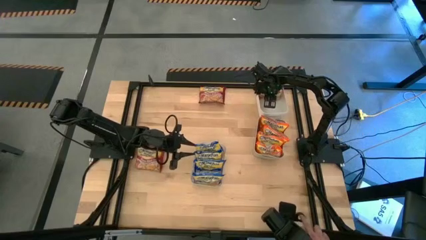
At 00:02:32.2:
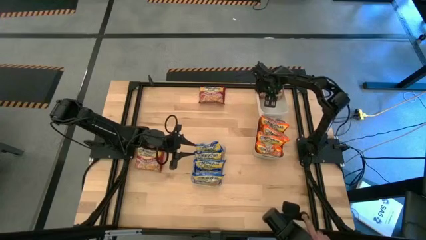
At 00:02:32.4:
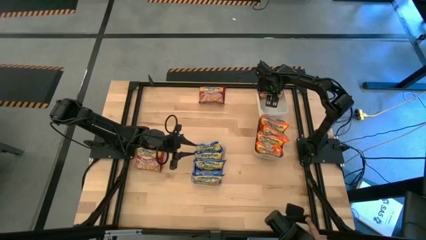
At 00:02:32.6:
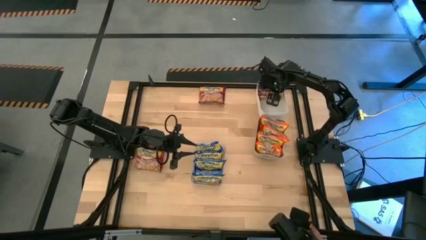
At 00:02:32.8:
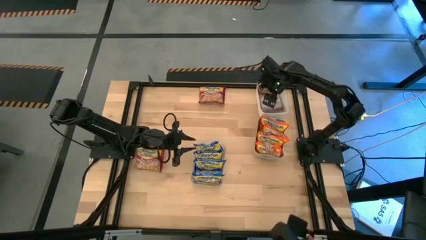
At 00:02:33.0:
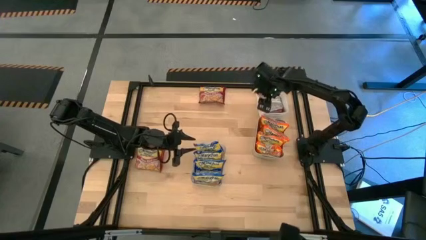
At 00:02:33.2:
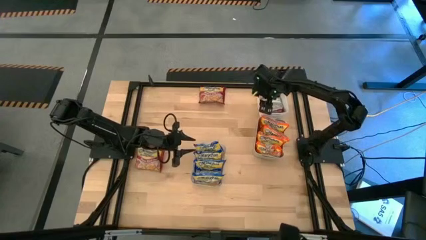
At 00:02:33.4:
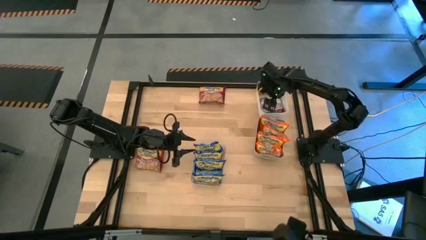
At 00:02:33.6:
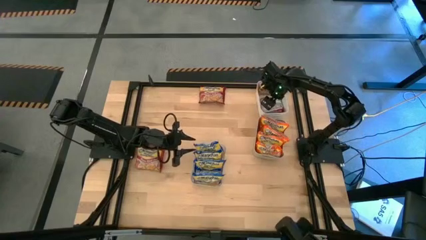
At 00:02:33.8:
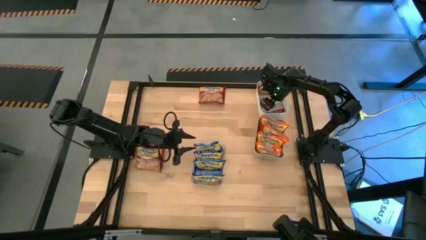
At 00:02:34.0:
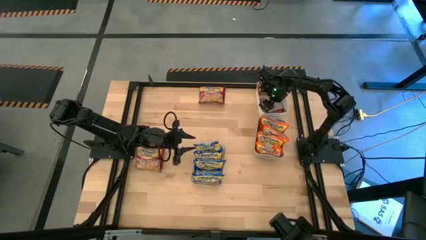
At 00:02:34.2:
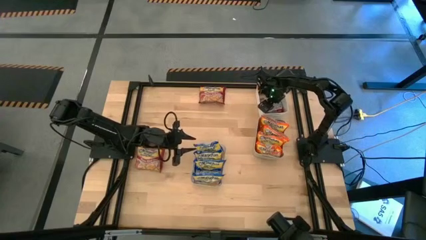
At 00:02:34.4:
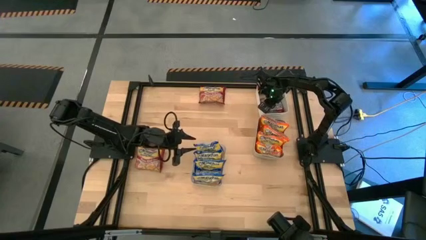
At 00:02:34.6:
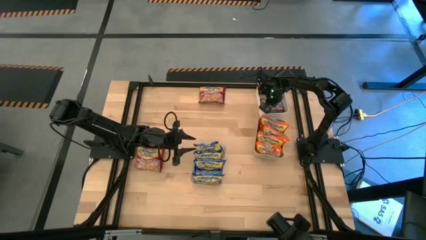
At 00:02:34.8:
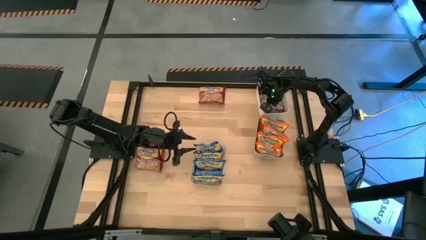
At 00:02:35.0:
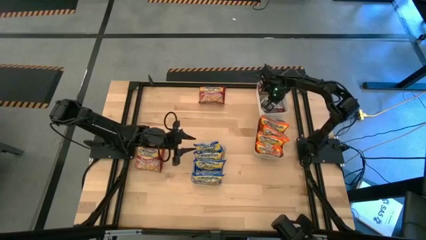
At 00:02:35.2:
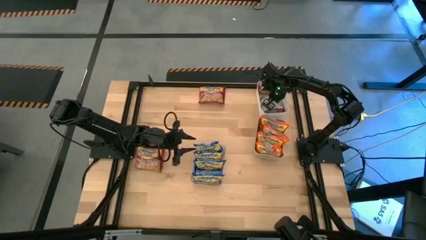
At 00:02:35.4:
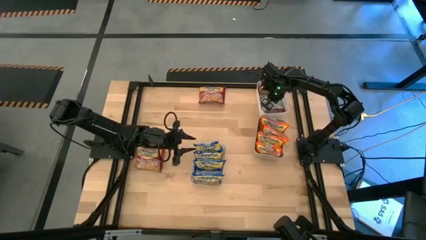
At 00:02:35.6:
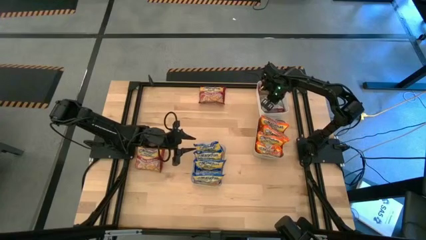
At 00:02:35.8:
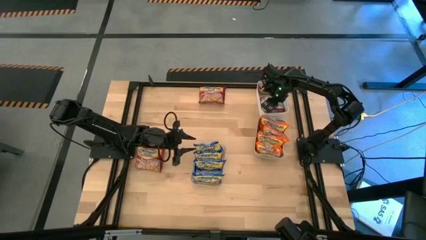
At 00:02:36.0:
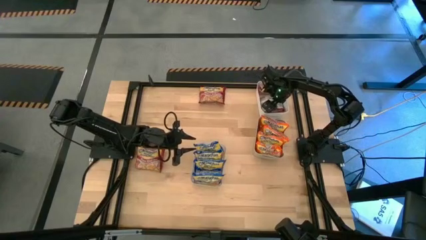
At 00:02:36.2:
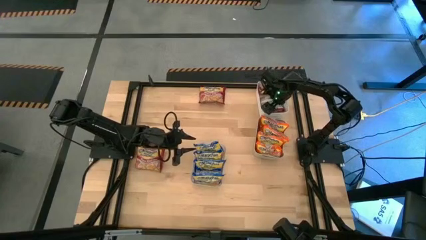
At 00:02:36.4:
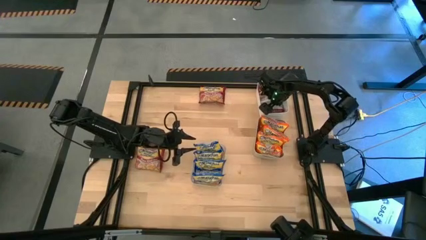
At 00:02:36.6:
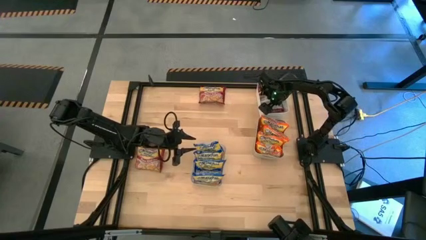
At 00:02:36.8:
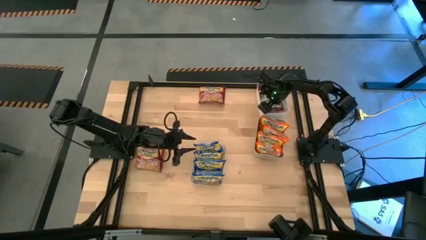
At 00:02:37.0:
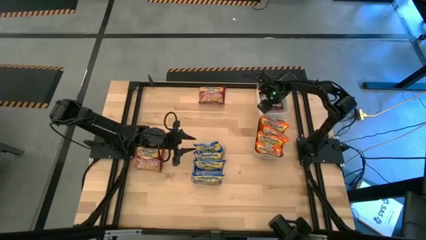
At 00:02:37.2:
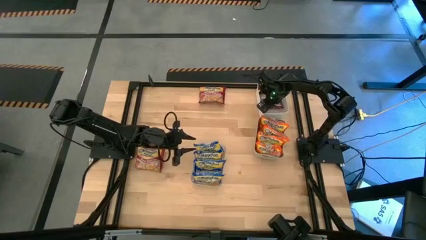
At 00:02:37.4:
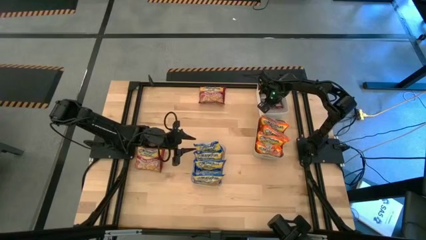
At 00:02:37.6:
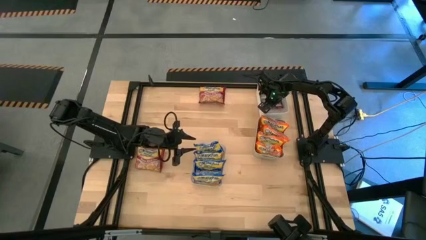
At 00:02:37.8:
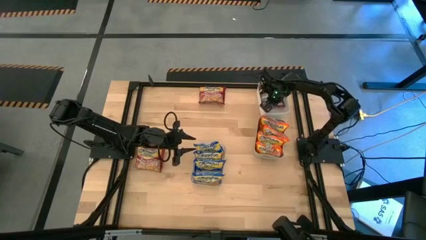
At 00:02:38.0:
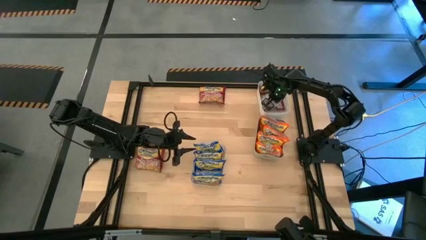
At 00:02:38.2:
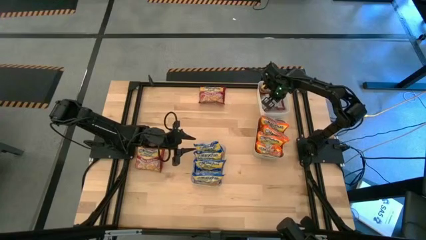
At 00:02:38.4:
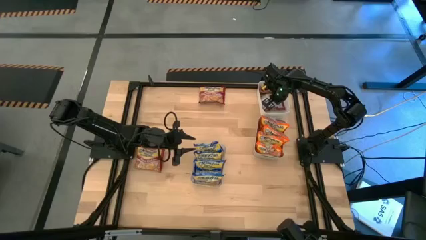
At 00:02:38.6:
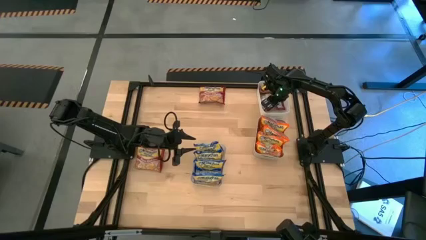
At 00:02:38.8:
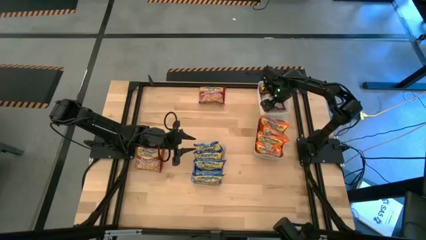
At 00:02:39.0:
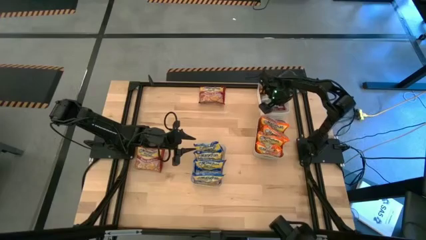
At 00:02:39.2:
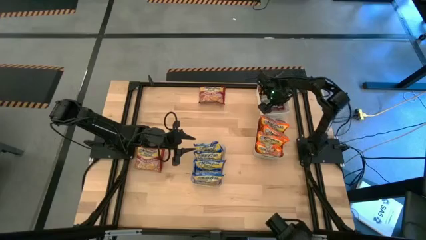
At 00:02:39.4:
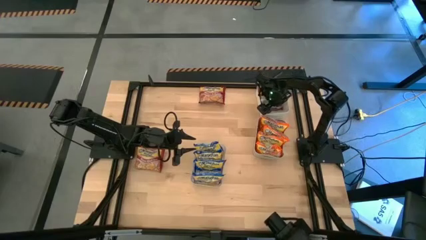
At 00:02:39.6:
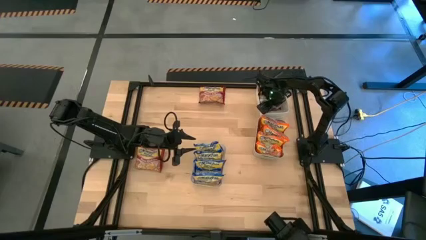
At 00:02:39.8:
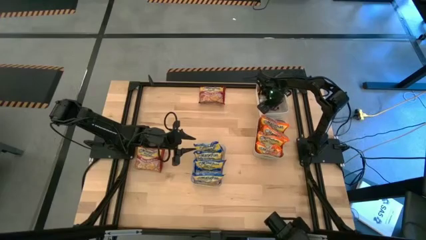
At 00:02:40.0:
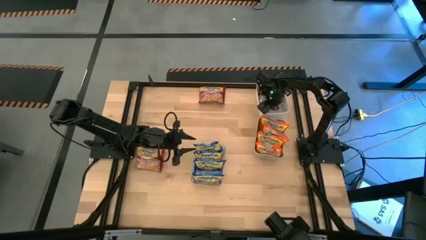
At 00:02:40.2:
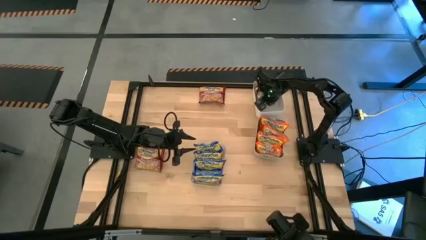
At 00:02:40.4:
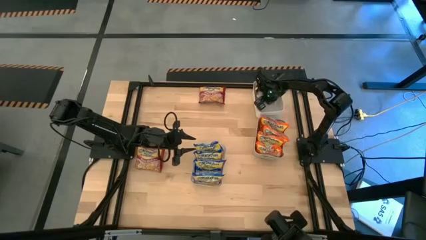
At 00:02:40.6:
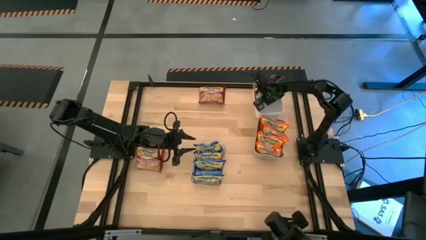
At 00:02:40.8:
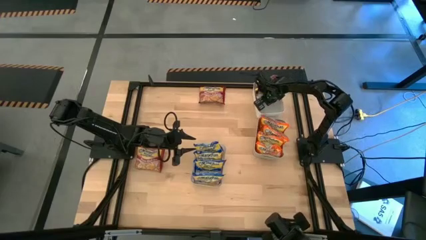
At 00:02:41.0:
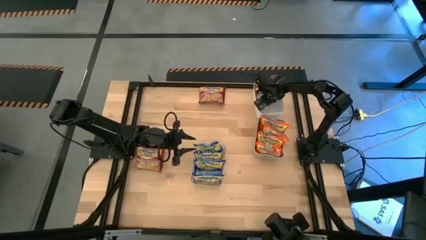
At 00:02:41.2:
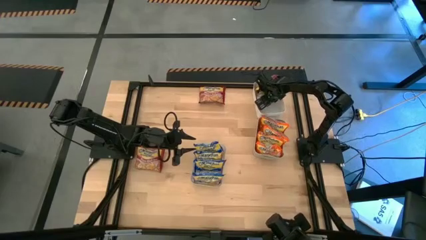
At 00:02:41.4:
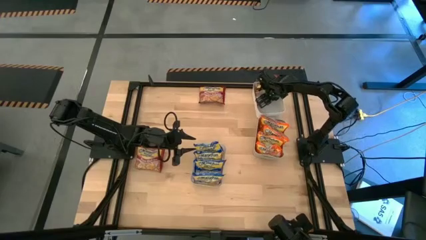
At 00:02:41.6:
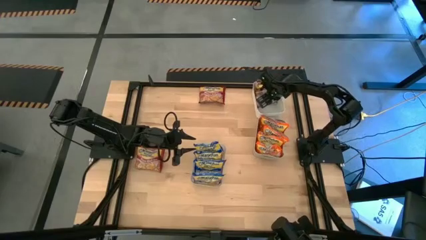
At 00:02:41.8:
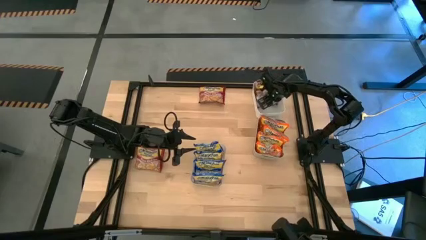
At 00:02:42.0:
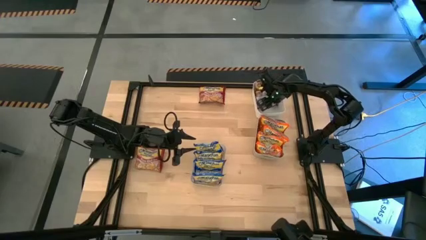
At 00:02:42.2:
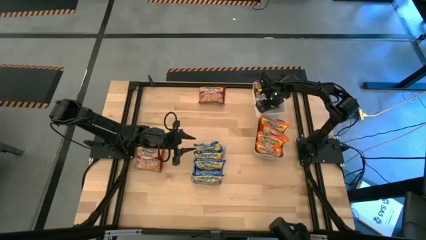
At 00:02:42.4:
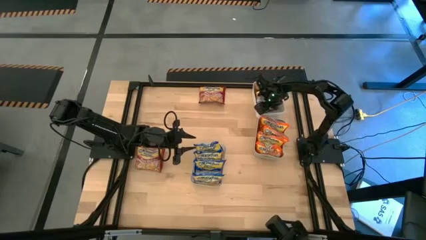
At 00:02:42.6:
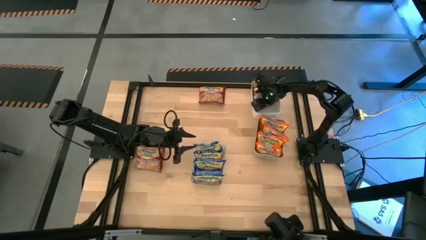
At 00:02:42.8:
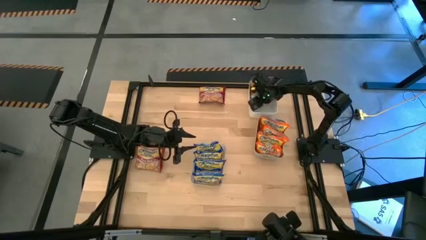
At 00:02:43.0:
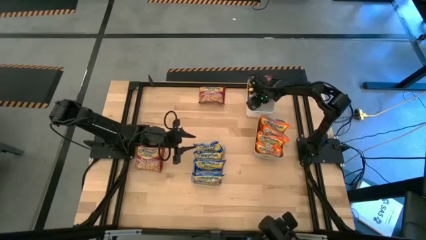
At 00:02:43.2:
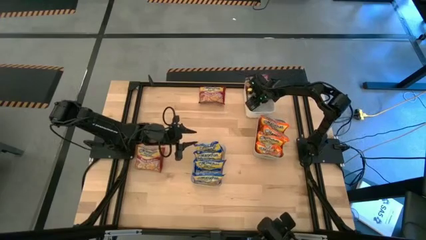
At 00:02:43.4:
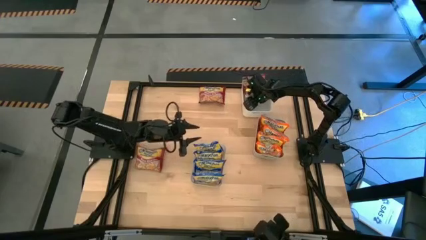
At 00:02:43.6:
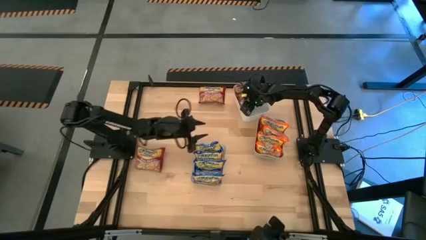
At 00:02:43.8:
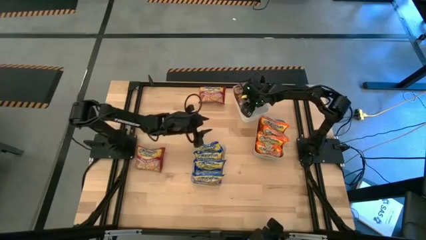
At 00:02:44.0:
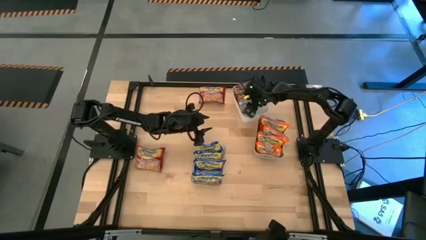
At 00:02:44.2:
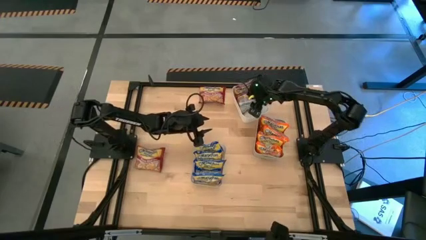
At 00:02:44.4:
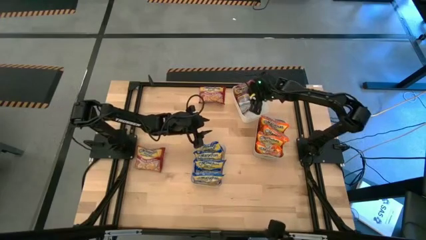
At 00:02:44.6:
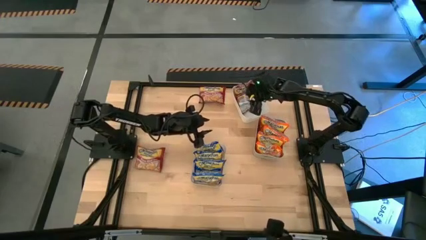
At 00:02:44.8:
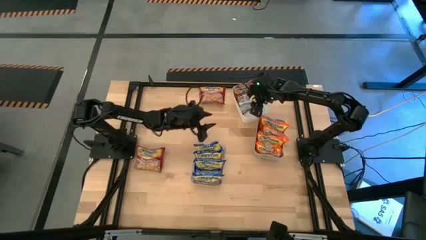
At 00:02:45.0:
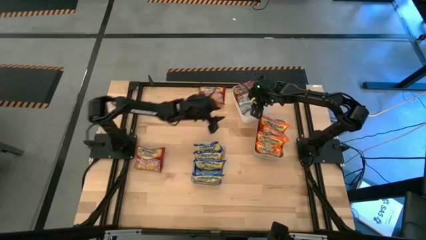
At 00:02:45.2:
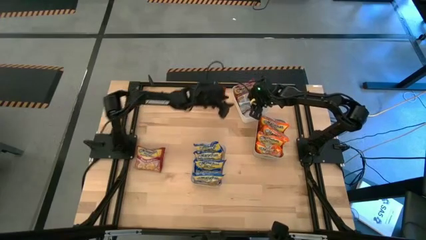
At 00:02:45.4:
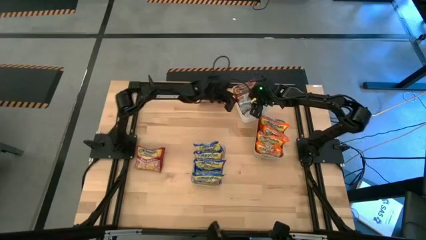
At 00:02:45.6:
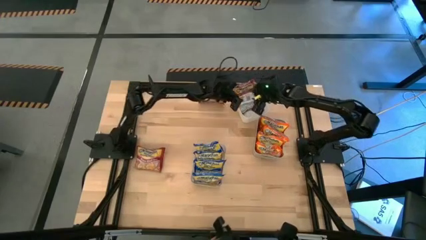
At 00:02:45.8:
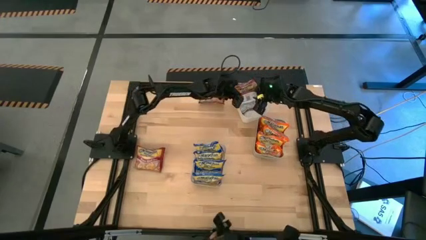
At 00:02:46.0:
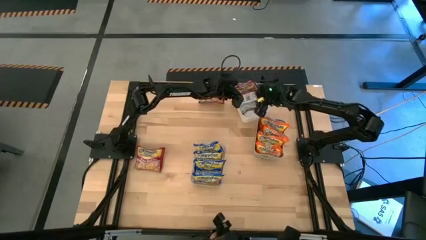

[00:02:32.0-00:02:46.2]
Task: Sort Maruchan noodles
Put the bottom right red noodle pack into the white bin
